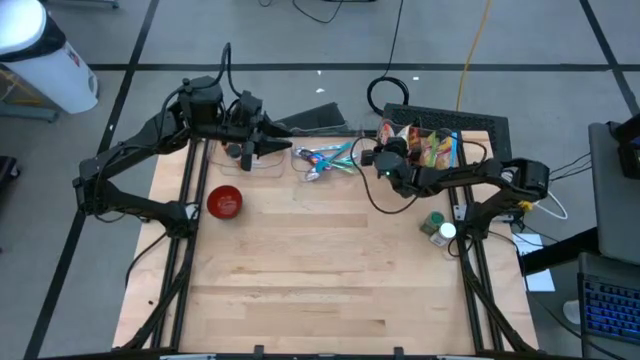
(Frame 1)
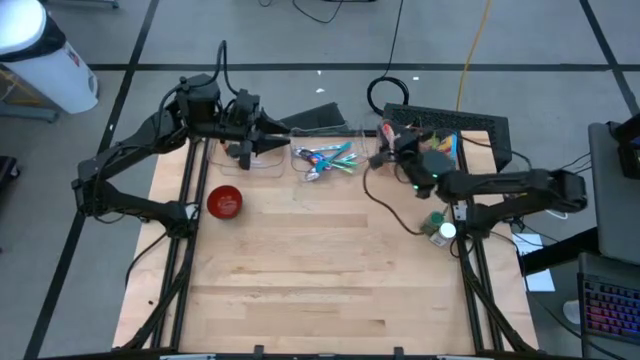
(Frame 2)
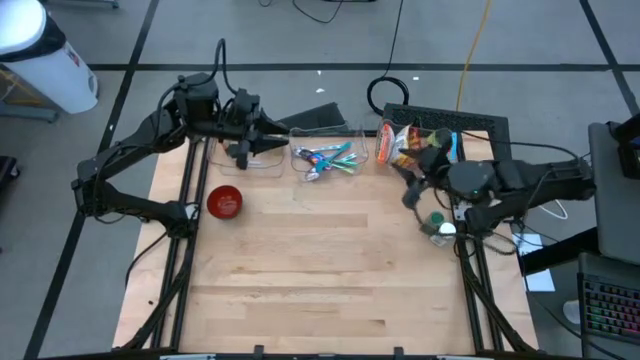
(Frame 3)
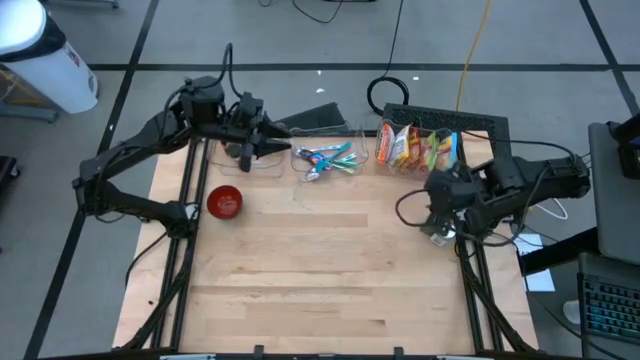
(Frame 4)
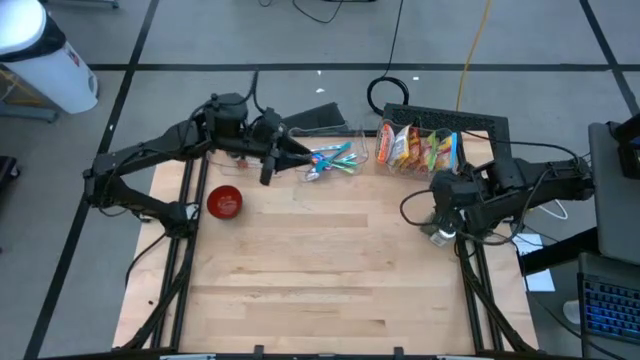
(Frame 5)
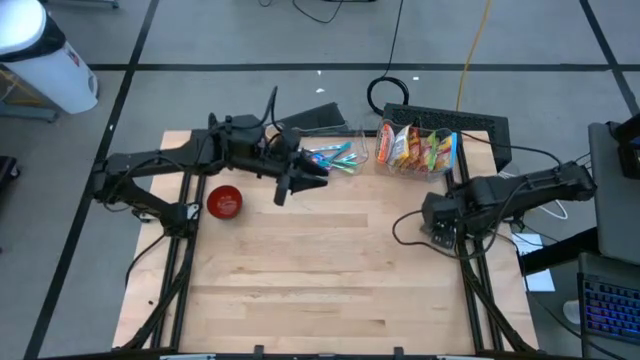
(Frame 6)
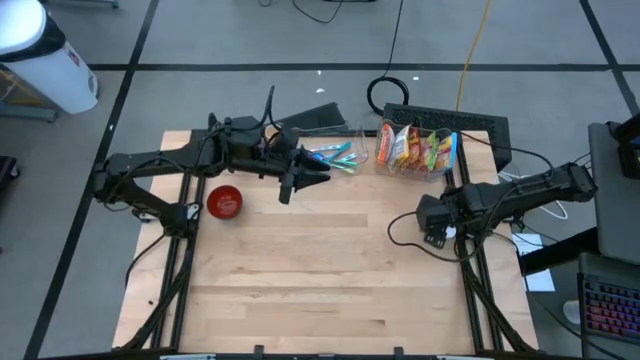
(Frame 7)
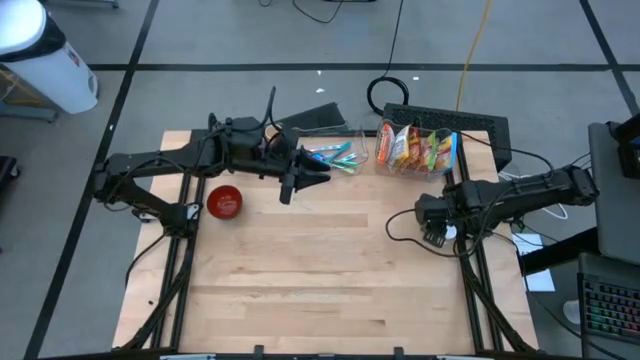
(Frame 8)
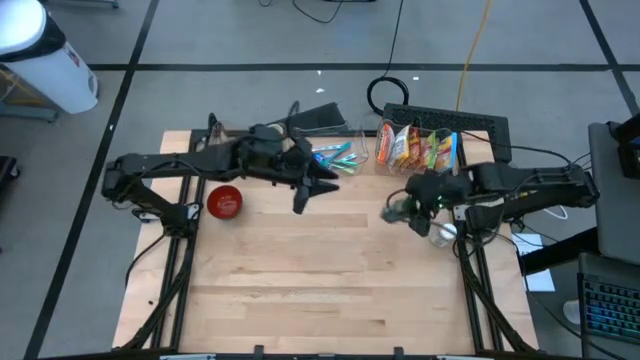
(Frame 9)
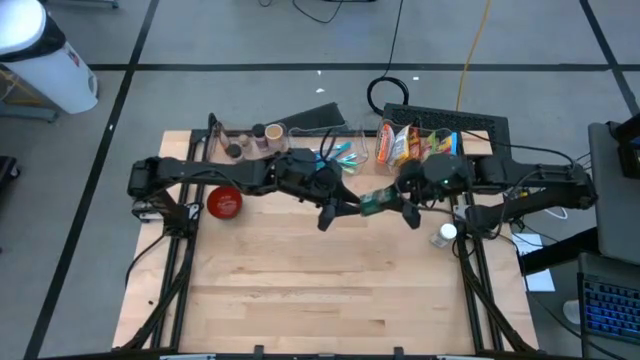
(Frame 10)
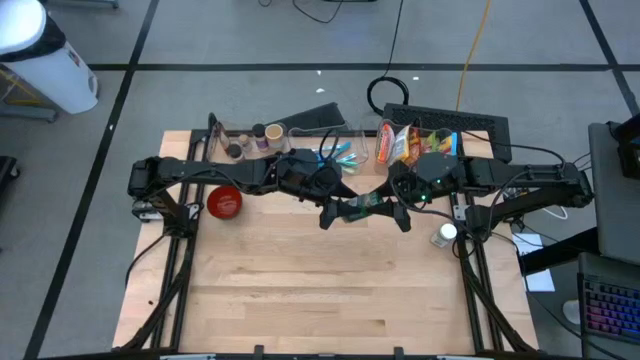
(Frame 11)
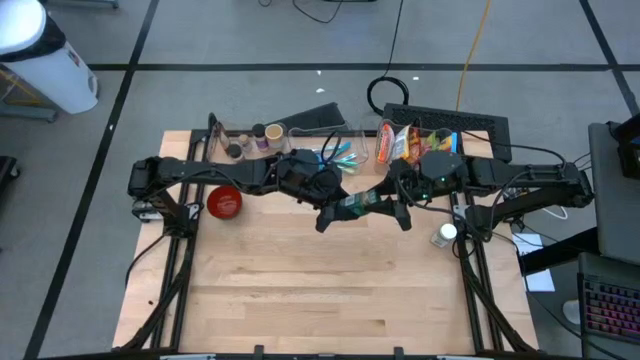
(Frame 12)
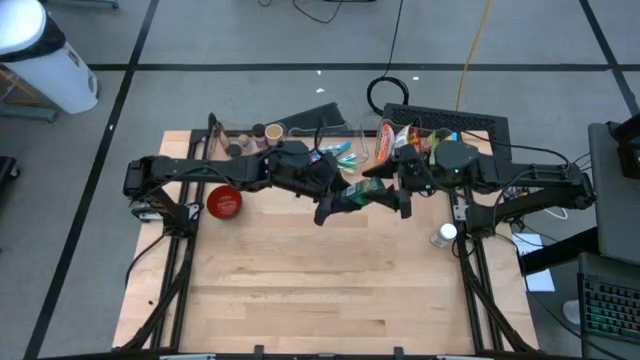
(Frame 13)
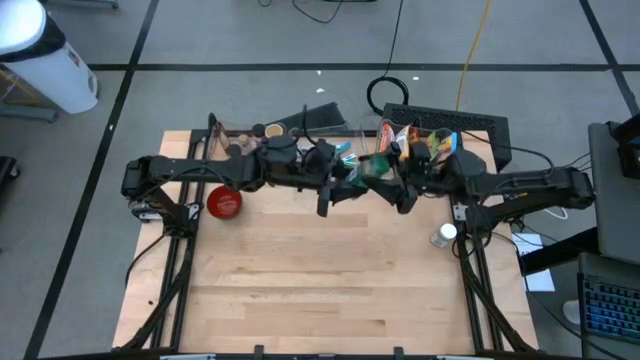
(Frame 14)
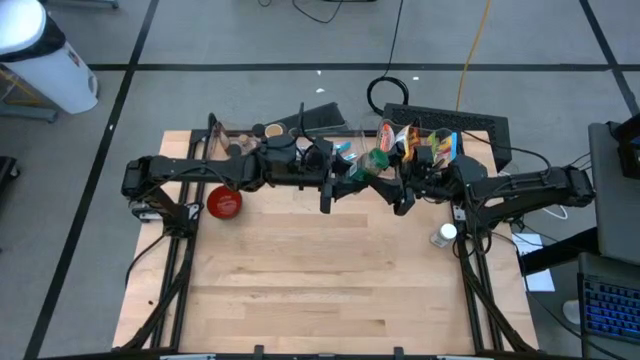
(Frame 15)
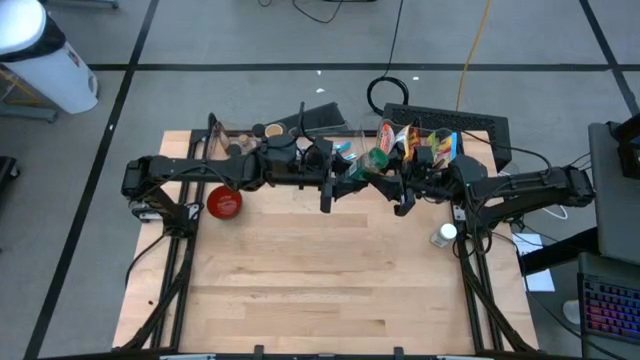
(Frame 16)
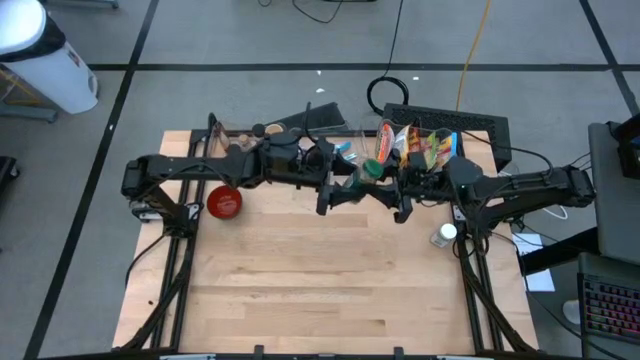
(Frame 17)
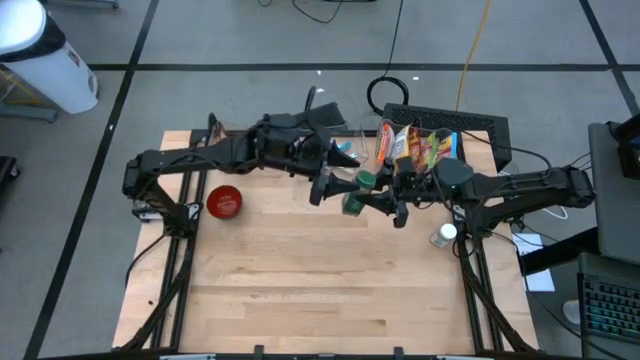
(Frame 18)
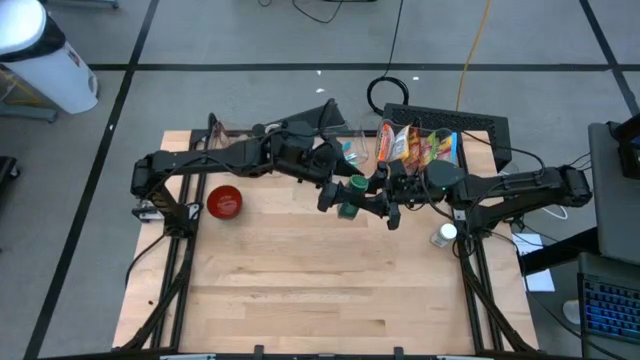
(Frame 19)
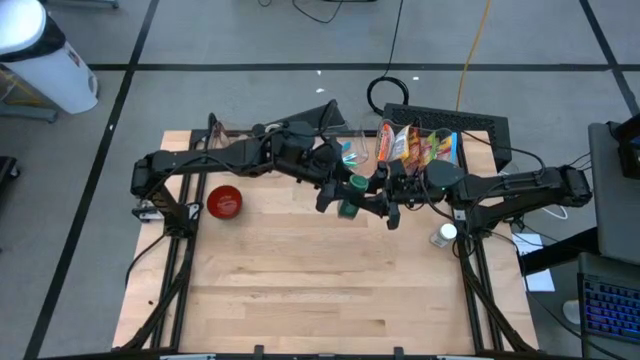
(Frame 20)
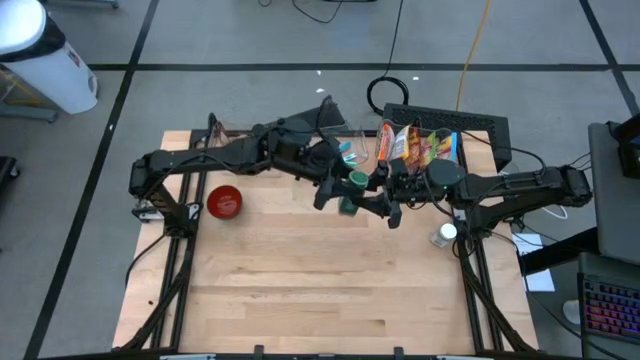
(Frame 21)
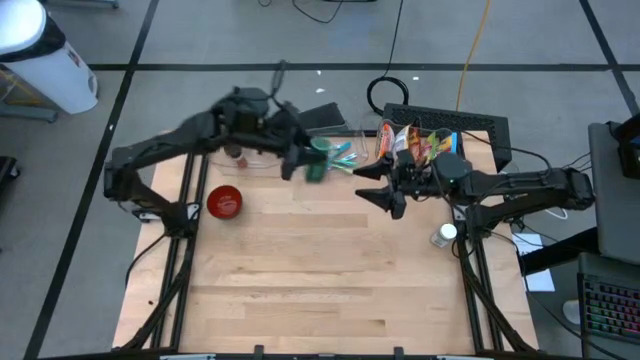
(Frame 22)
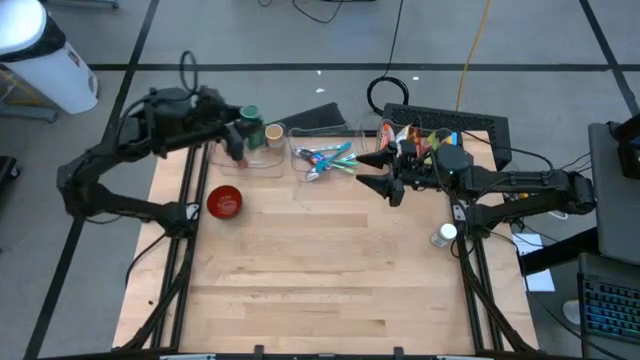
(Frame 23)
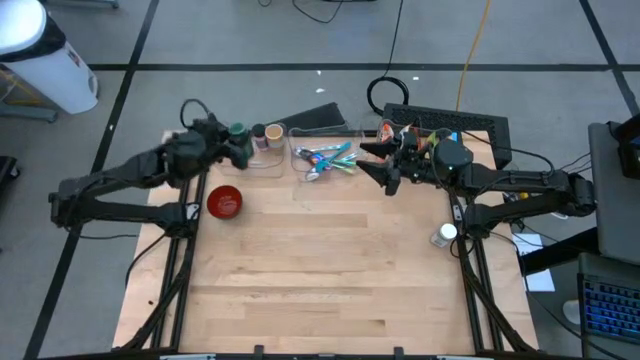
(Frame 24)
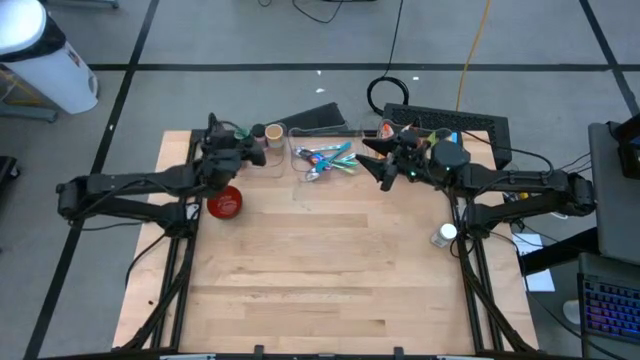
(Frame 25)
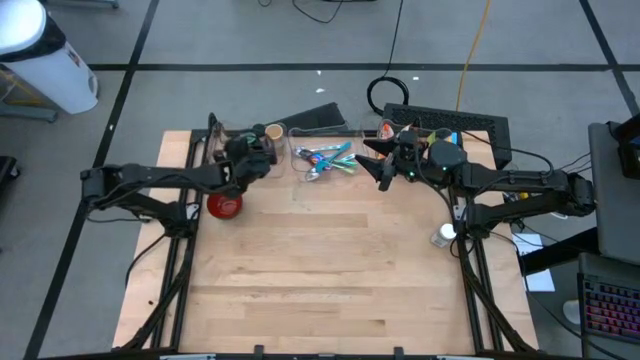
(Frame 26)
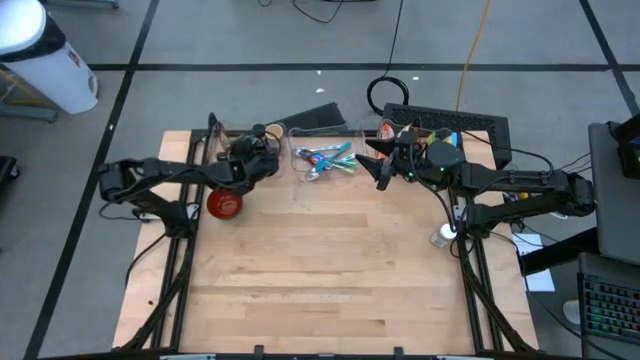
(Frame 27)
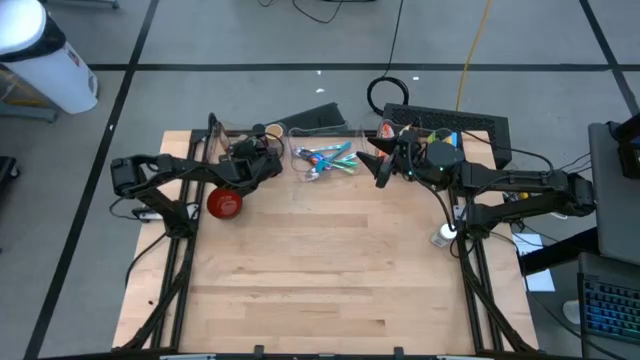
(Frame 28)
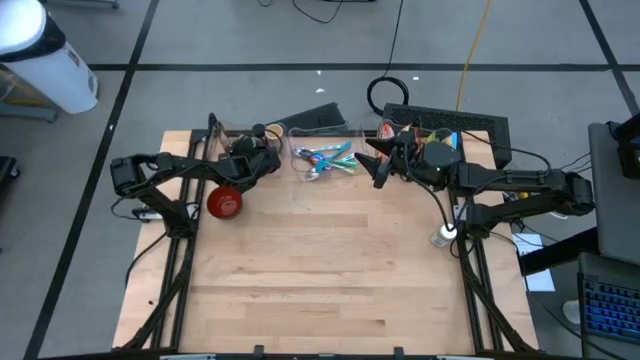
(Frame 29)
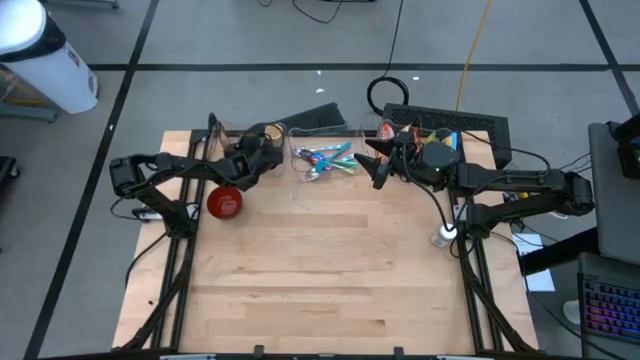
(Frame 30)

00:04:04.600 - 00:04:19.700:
Task: Pick & Place Food Item
Put the green seasoning bottle into the left transparent bin

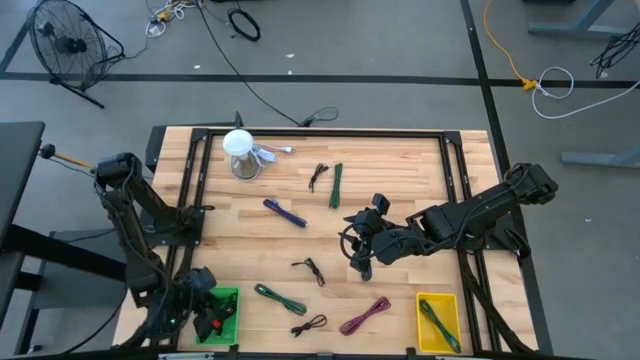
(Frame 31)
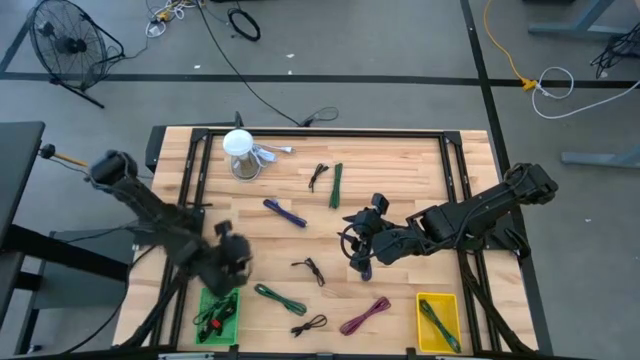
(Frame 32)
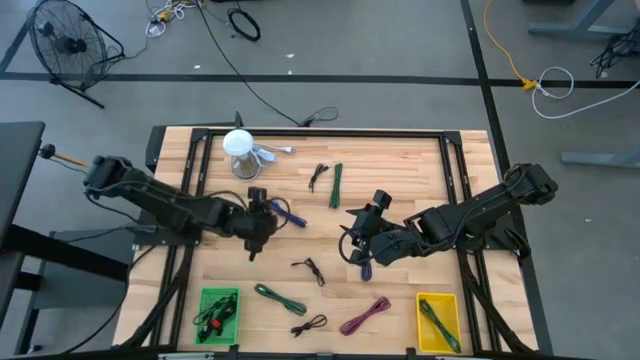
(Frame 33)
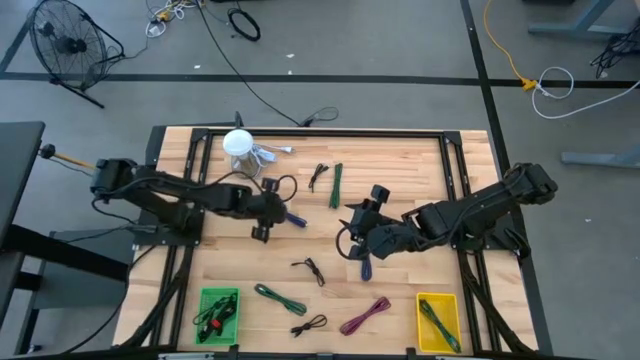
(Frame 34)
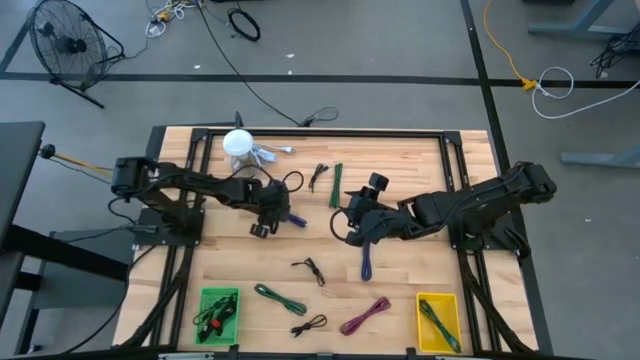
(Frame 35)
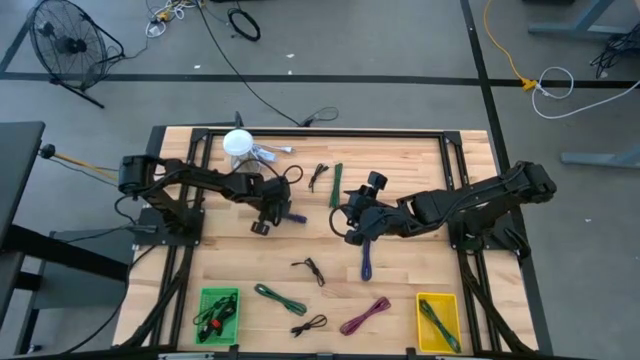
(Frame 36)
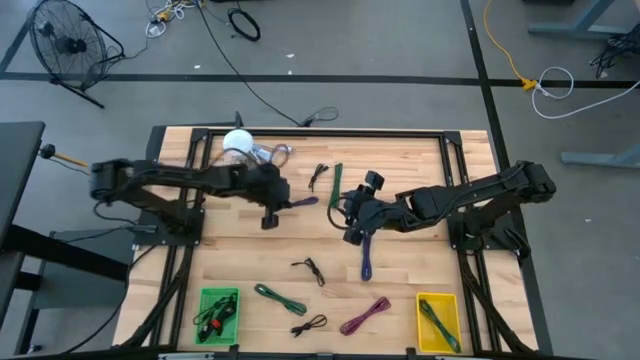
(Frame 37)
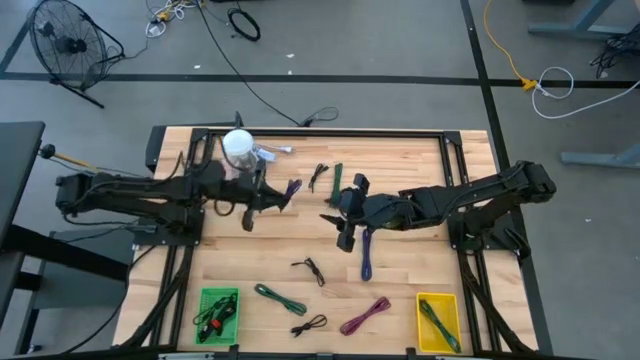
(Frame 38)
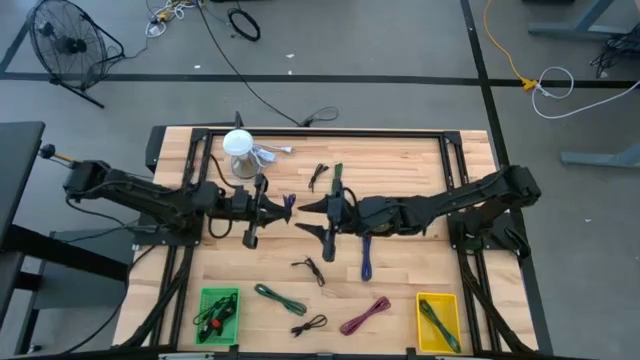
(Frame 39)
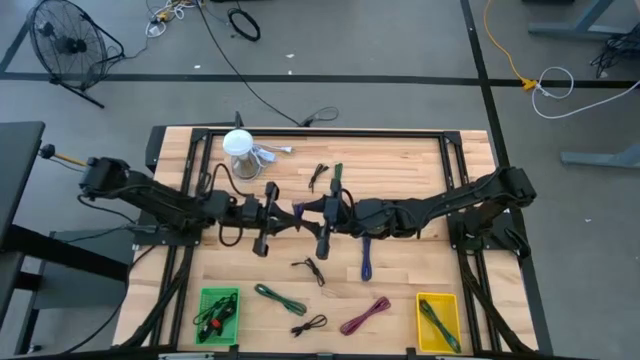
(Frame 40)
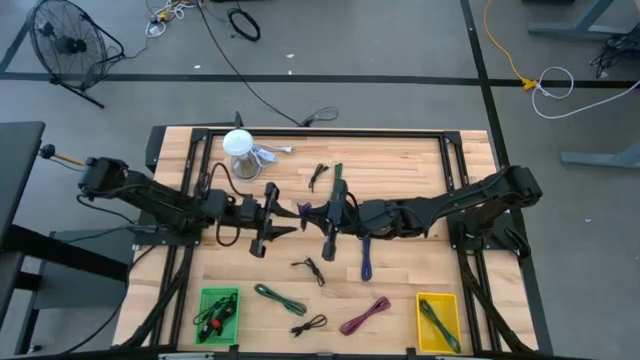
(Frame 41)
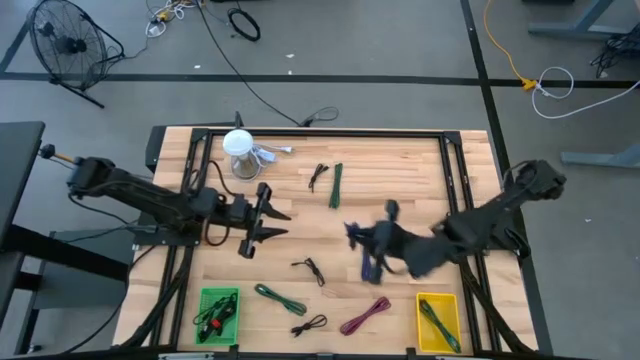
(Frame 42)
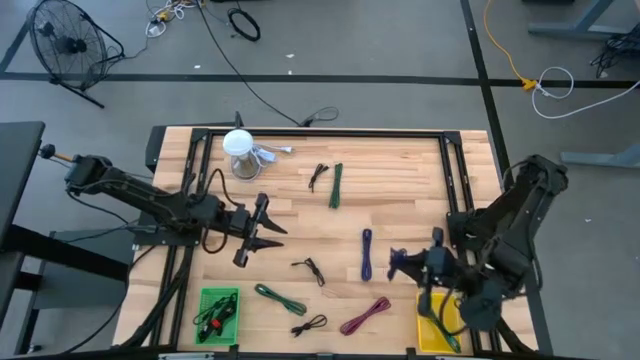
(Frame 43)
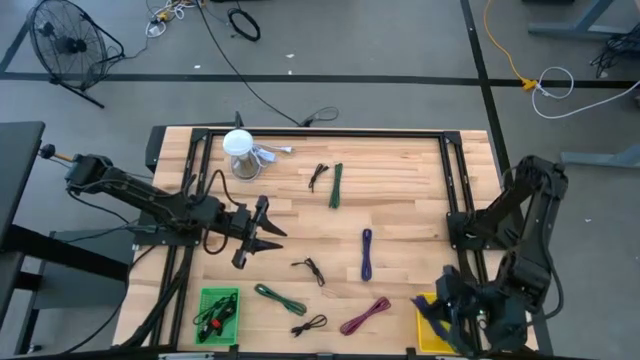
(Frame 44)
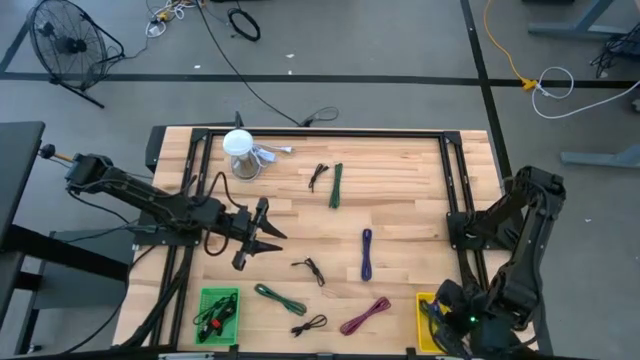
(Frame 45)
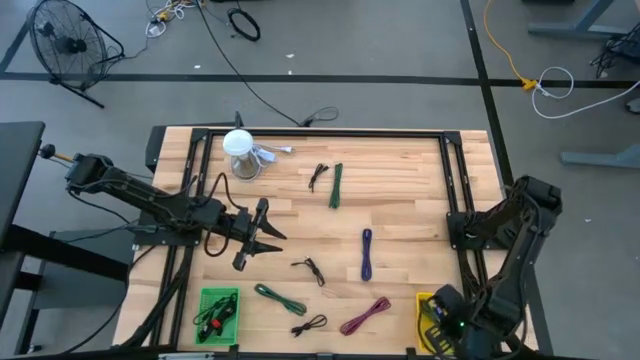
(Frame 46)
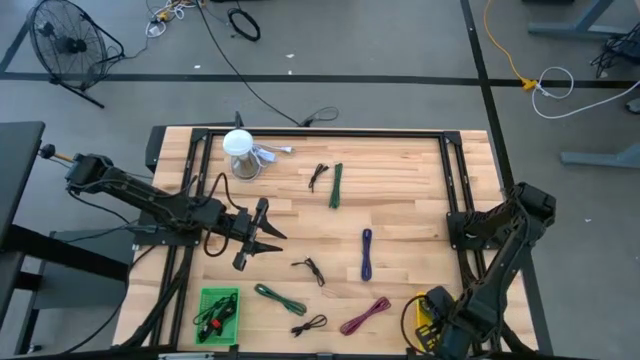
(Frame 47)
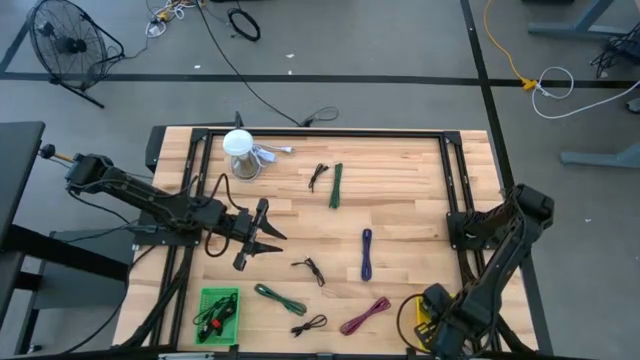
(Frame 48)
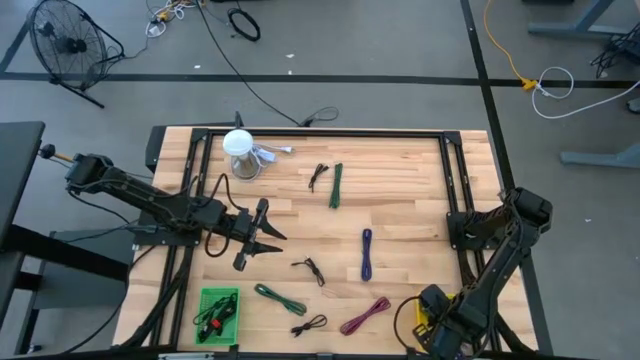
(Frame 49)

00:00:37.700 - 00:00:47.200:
Task: Pick & Place USB Port
Put the black violet charger cable into the yellow bin
